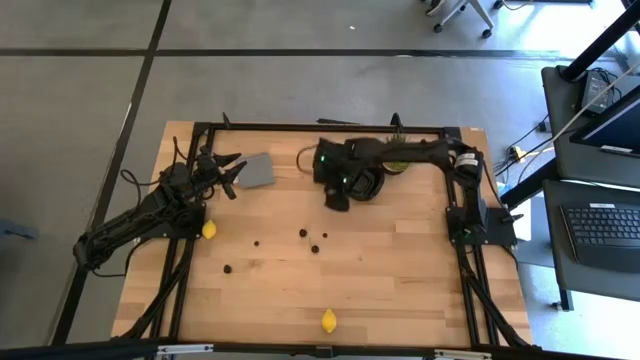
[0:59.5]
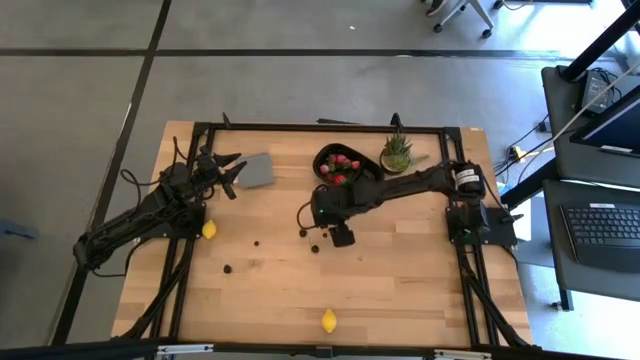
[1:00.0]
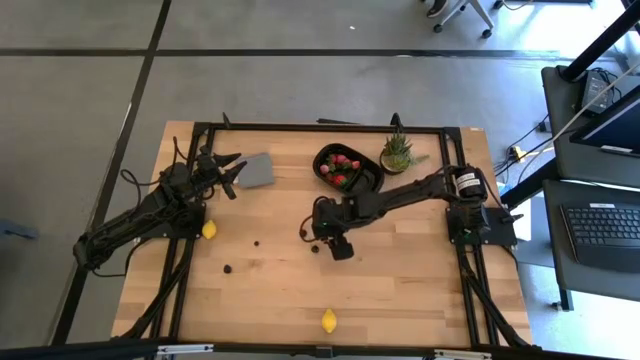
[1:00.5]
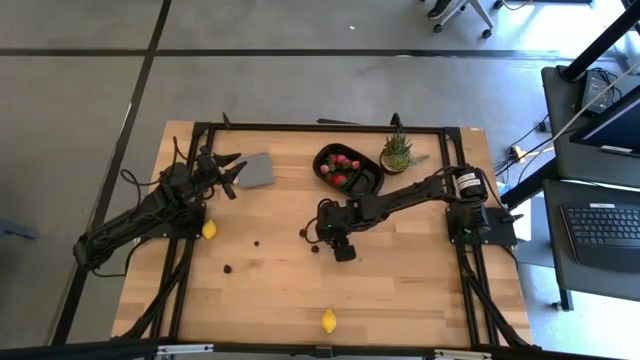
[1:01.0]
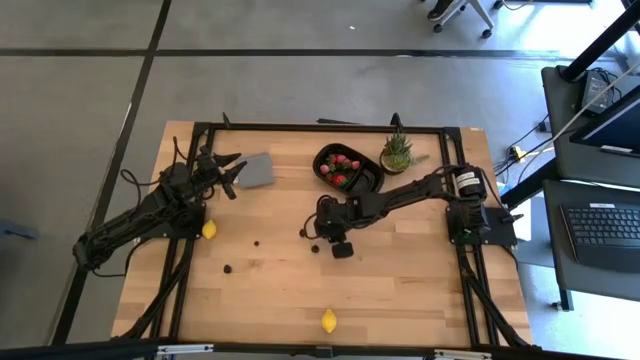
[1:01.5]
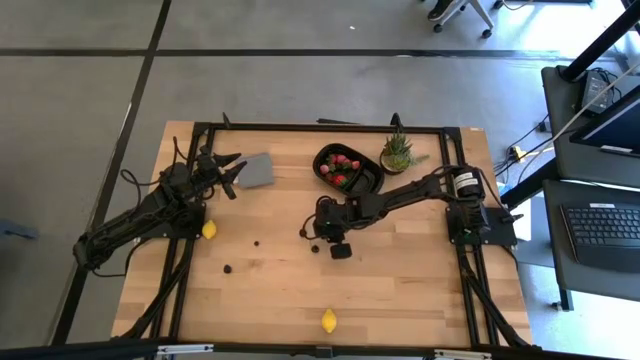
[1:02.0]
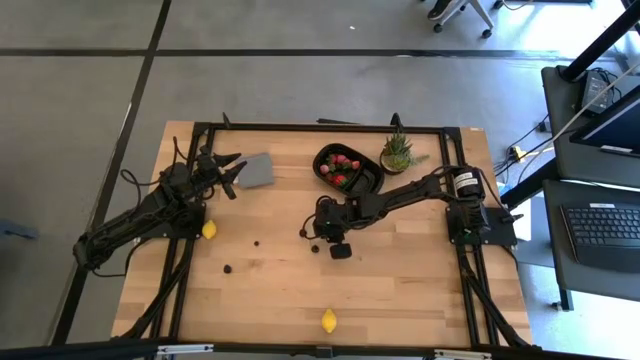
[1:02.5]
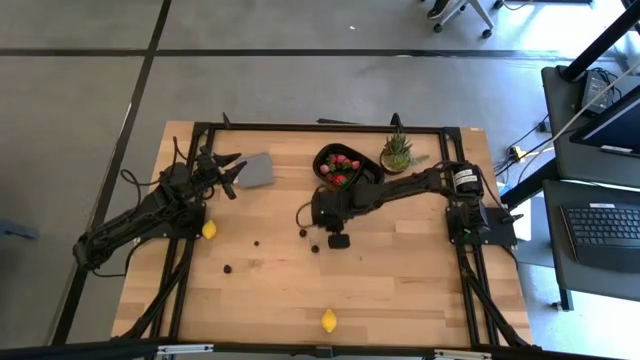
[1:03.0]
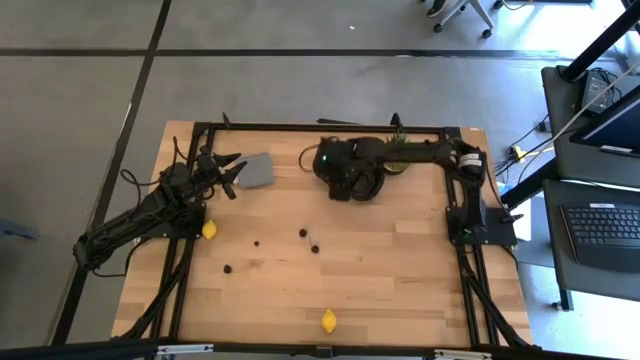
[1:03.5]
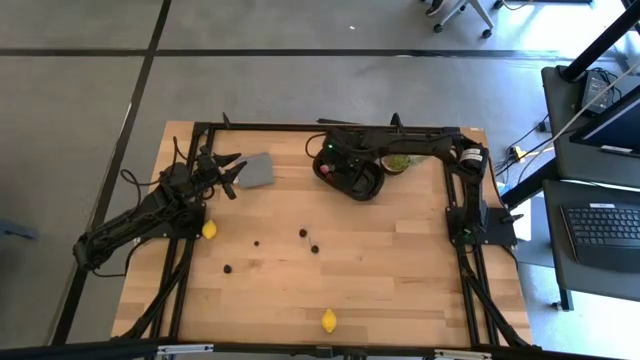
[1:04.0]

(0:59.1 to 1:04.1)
Task: Pick and placing Produce into tupperware
Put the right blueberry into the black bin

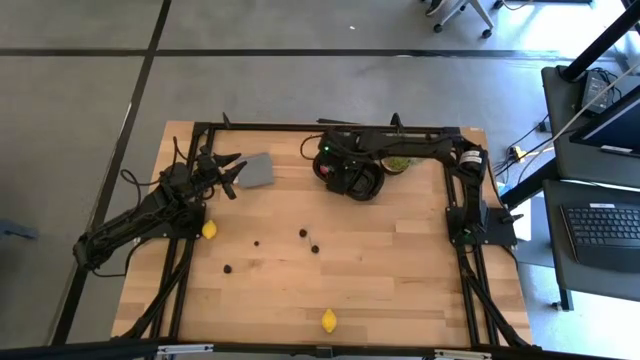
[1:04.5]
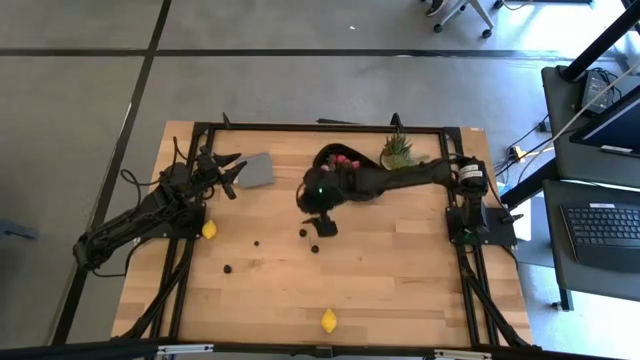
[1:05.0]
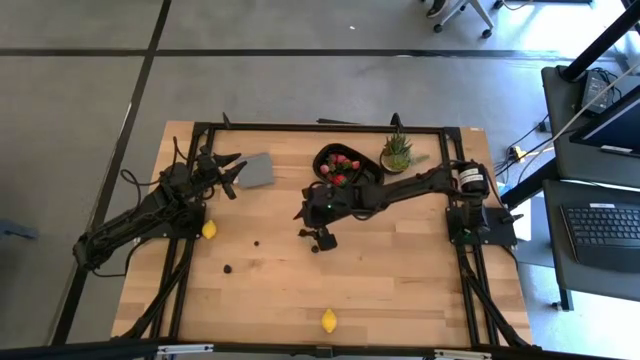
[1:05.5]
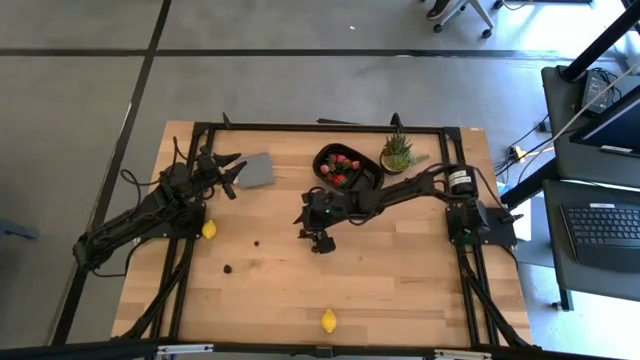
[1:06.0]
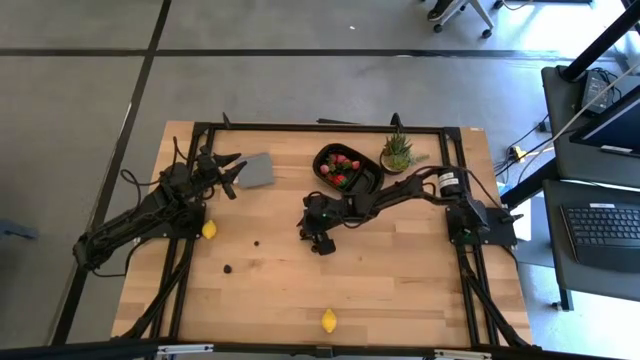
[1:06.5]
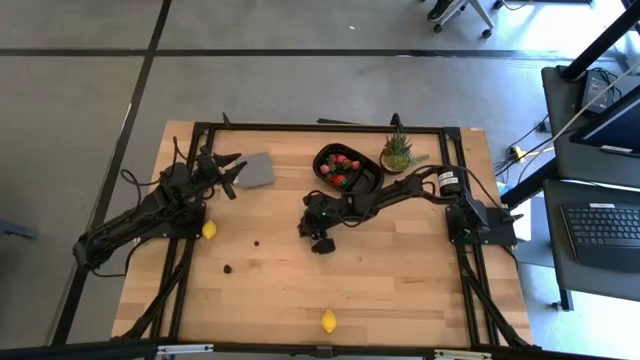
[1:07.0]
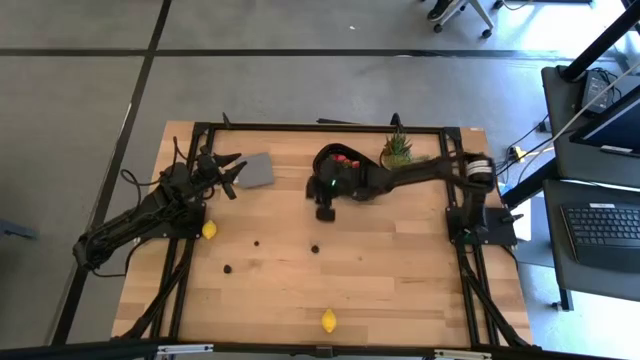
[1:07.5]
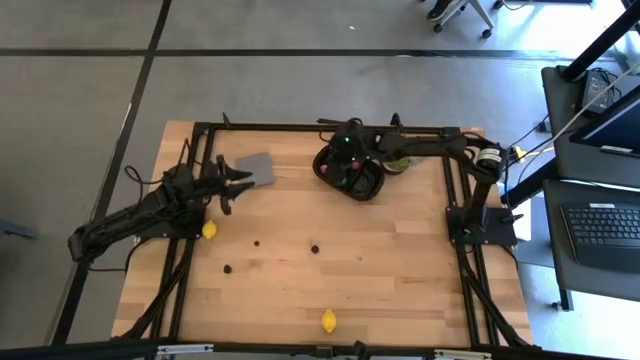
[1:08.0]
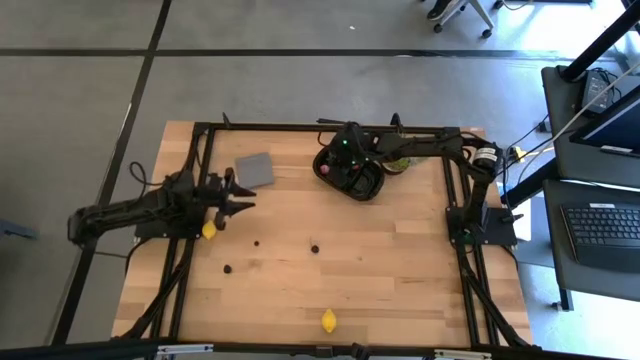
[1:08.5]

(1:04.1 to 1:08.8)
Put the top black cherry into the black bin

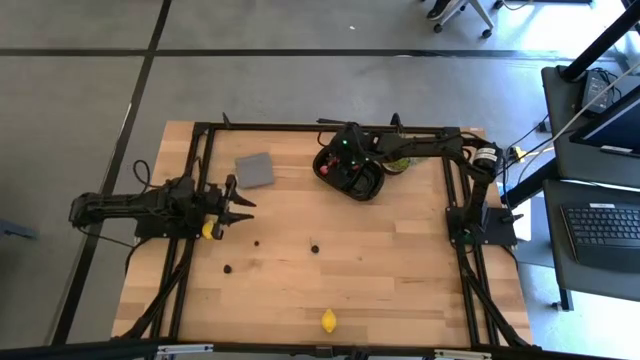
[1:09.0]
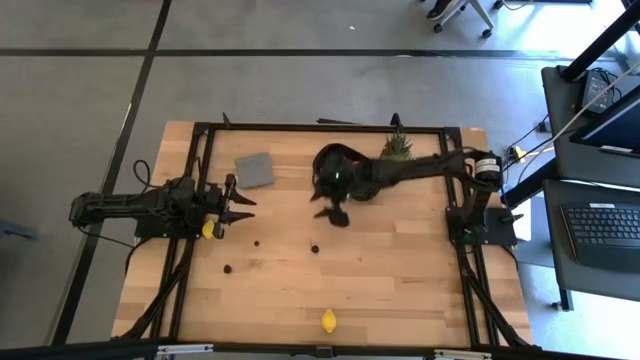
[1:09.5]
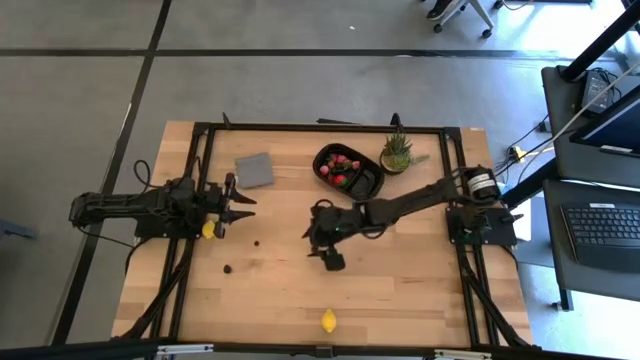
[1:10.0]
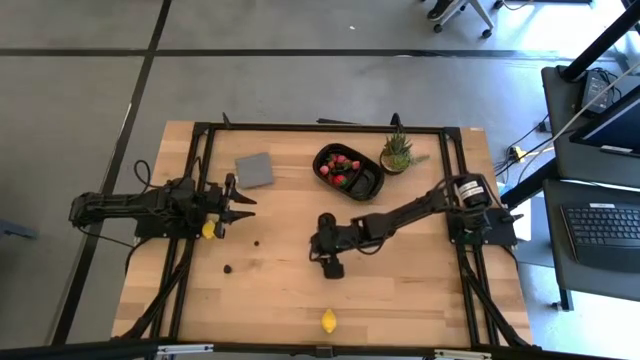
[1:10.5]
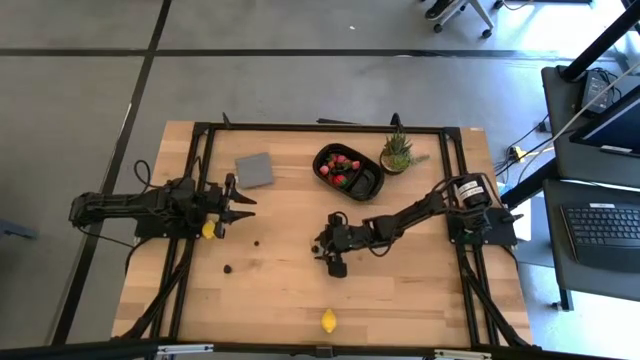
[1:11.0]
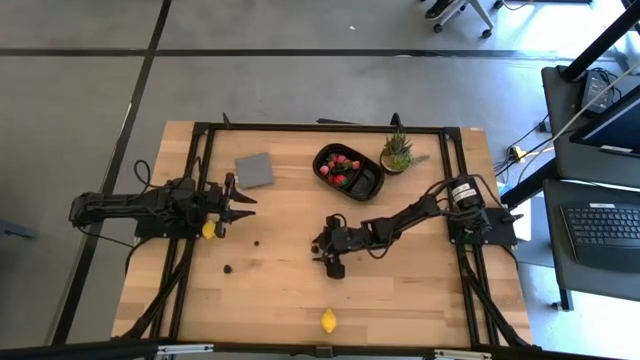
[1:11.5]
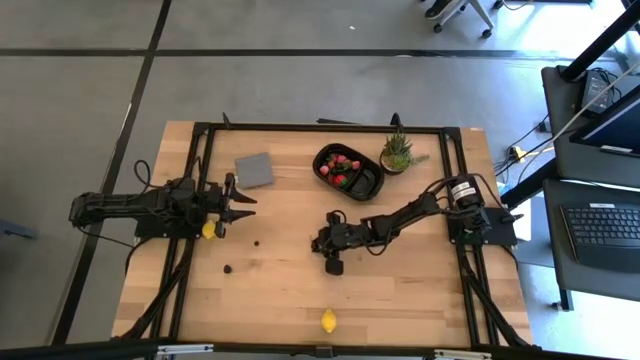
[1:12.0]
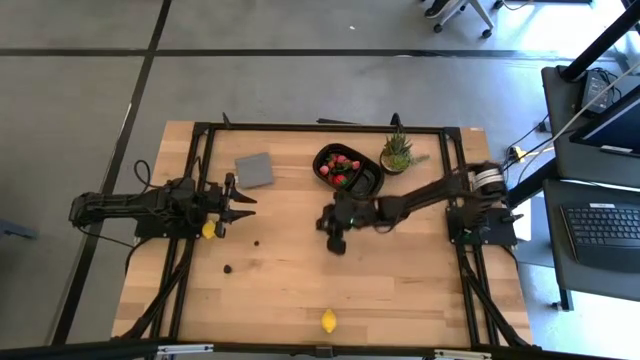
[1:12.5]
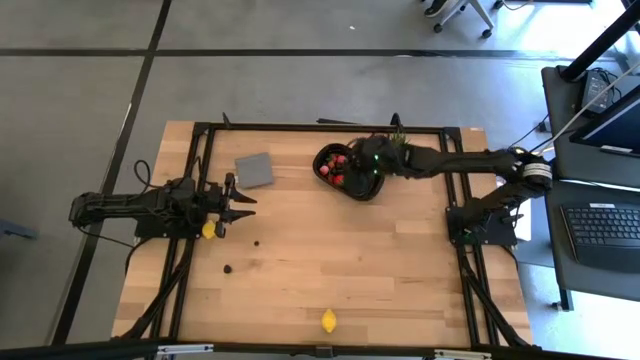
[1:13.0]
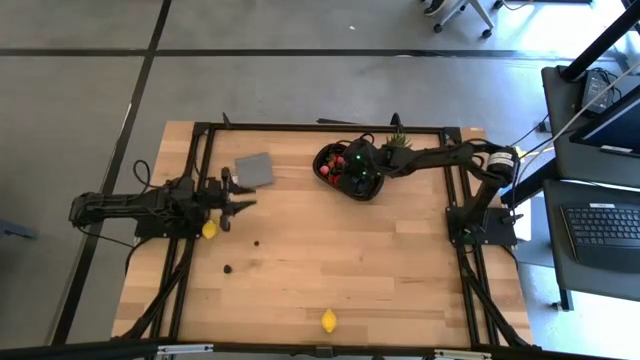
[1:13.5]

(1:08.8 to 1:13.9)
Put the black cherry into the black bin

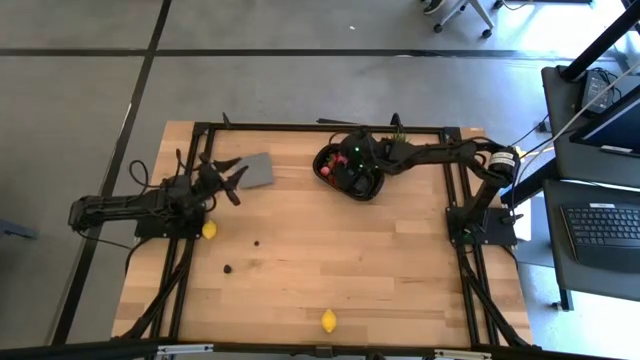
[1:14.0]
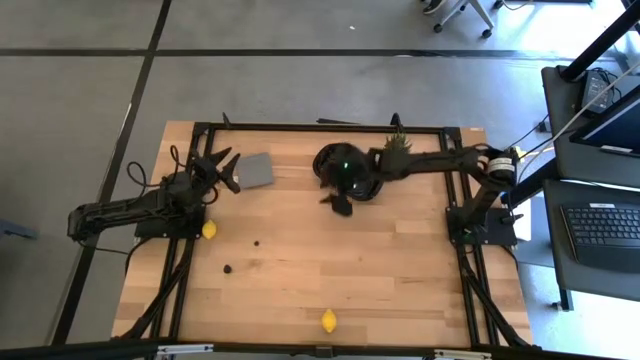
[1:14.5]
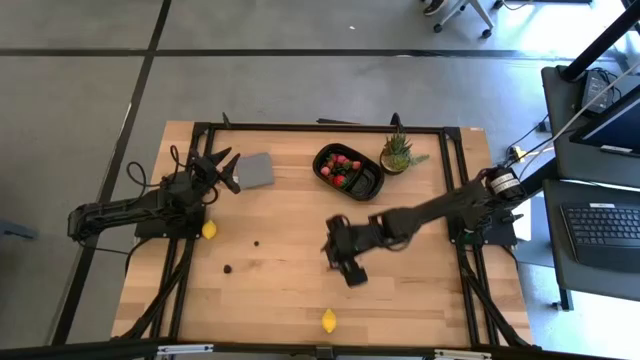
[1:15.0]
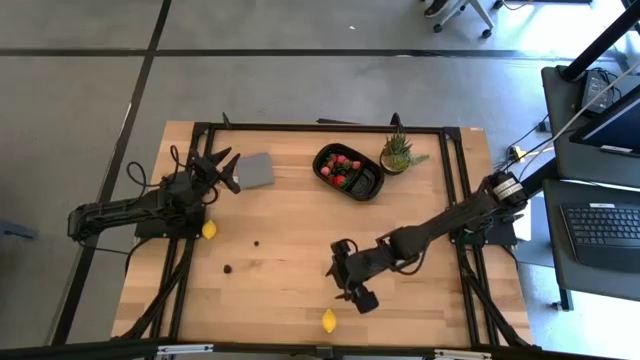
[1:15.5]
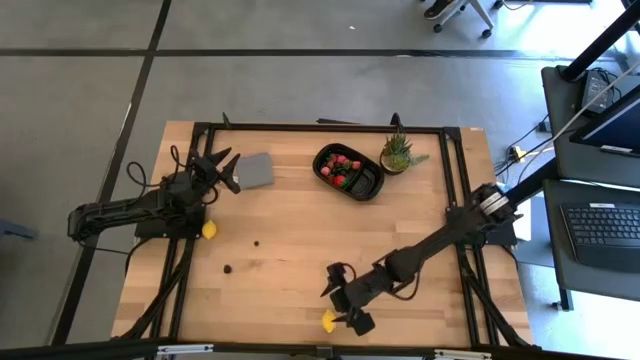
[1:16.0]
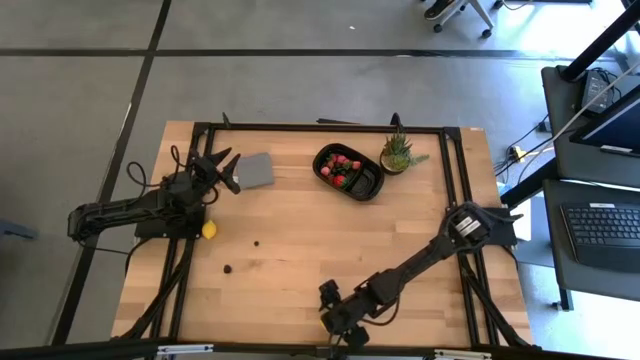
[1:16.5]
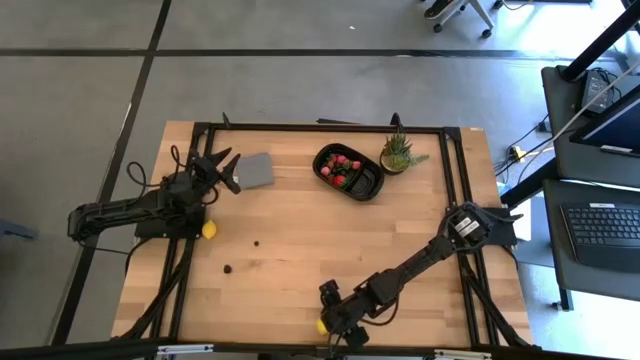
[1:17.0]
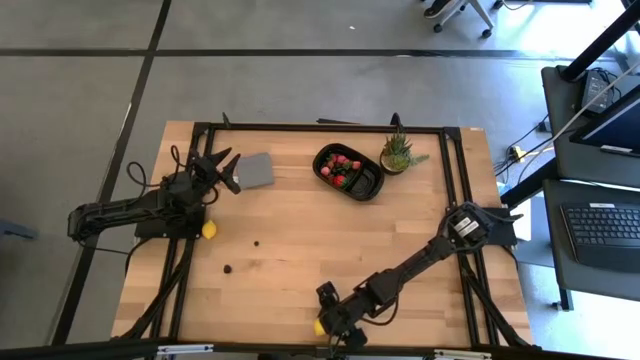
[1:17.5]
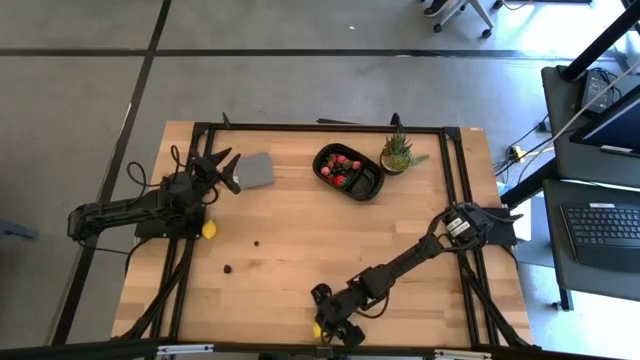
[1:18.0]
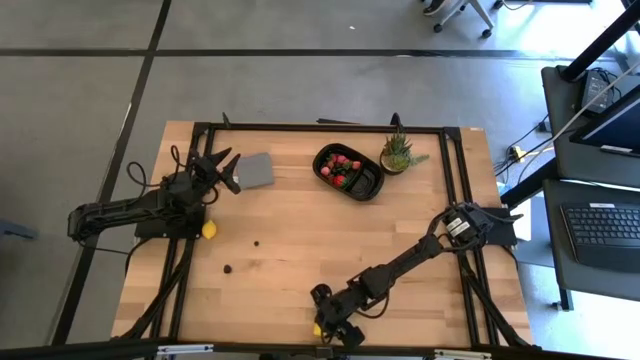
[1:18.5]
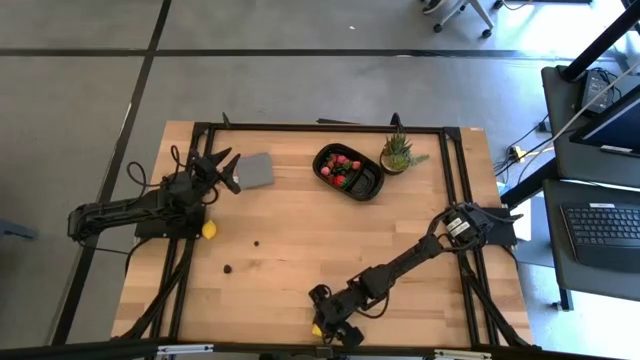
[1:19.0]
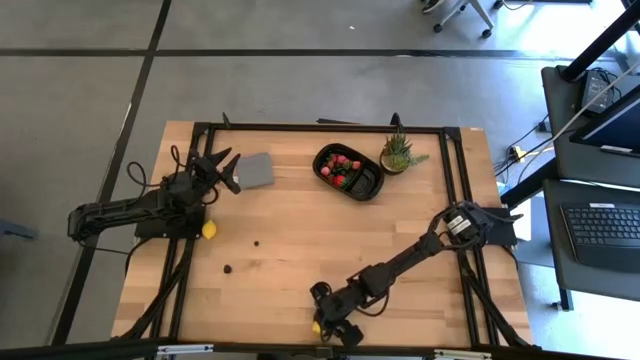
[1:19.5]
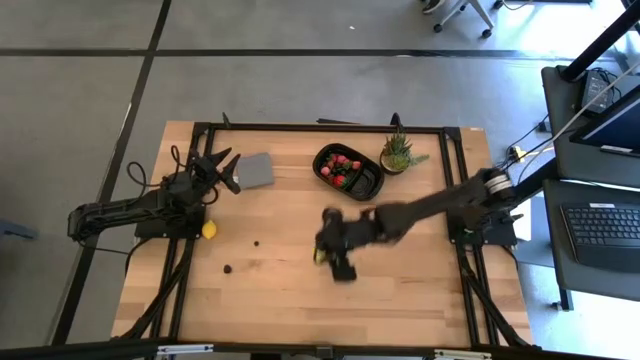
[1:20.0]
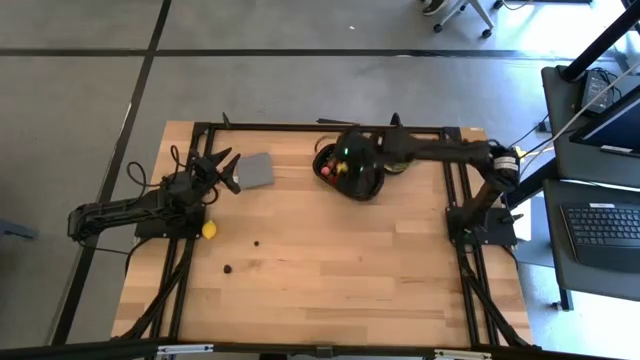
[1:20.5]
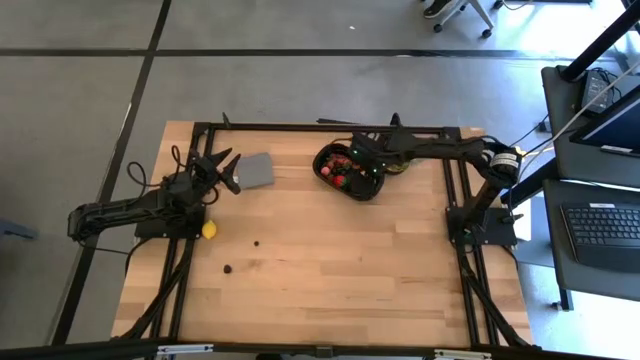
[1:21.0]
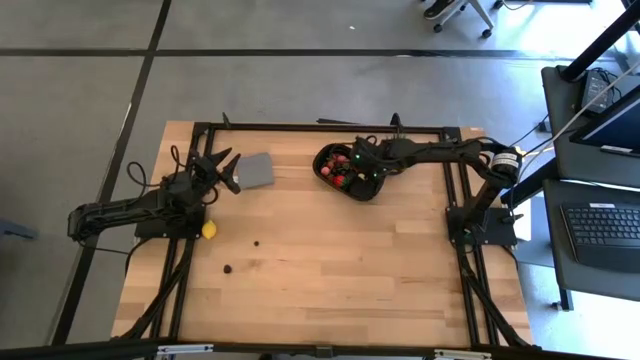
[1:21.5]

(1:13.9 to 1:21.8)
Put the bottom lemon into the black bin
